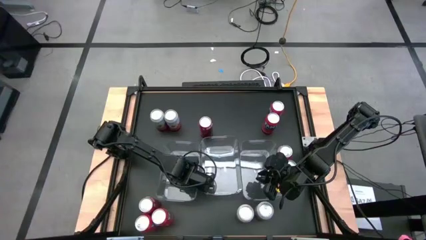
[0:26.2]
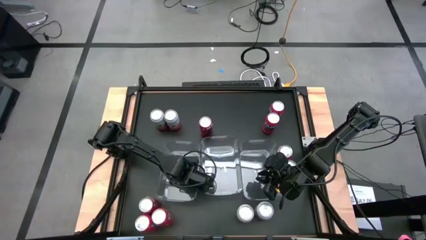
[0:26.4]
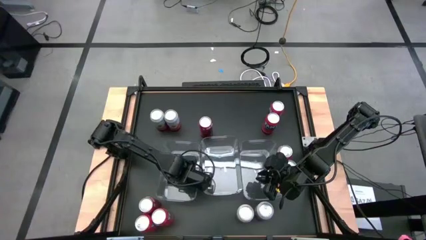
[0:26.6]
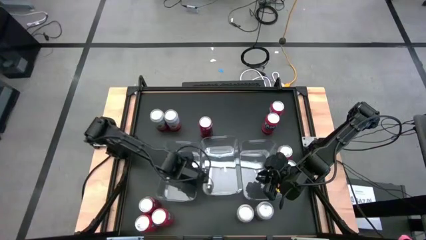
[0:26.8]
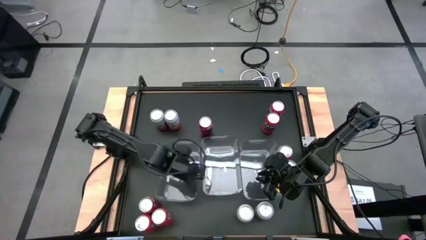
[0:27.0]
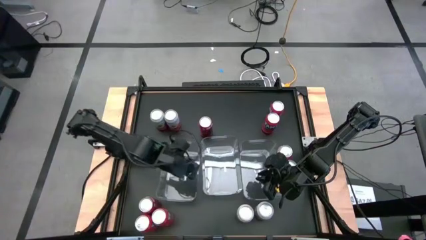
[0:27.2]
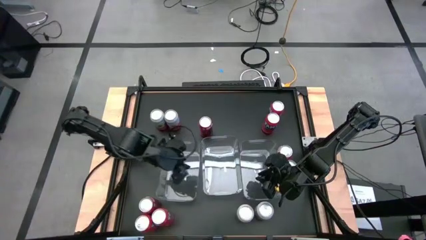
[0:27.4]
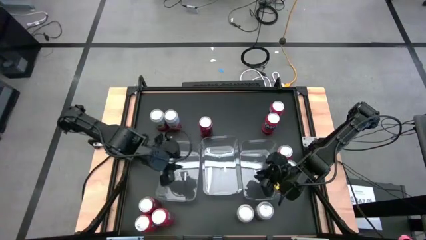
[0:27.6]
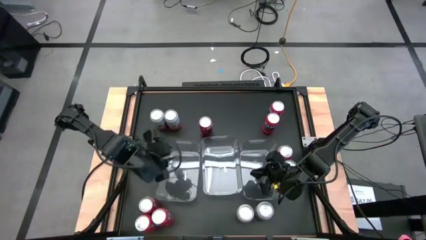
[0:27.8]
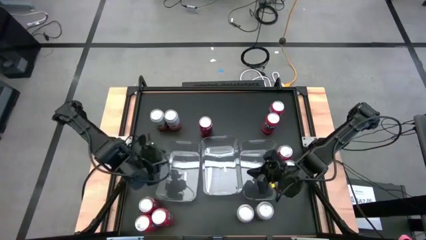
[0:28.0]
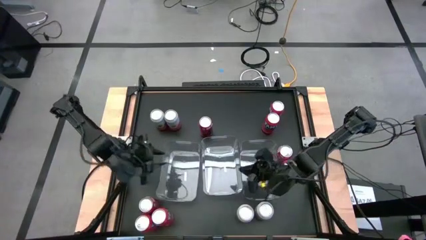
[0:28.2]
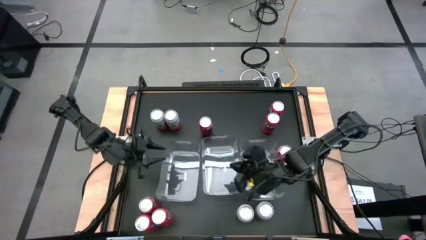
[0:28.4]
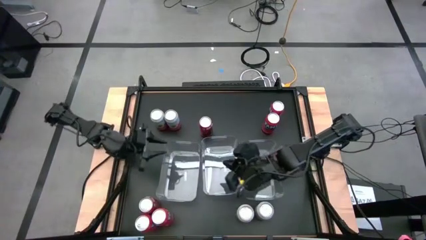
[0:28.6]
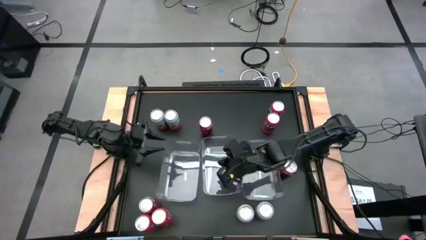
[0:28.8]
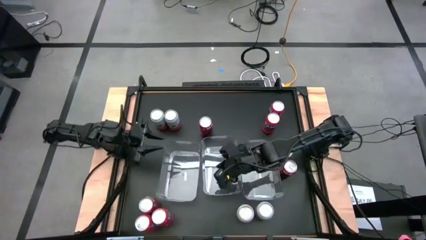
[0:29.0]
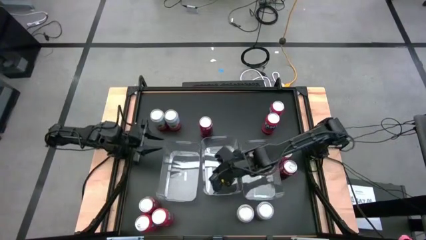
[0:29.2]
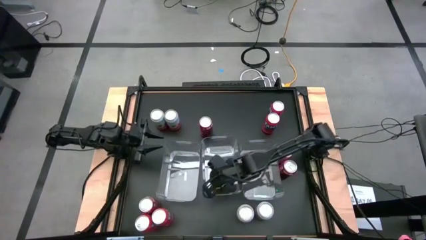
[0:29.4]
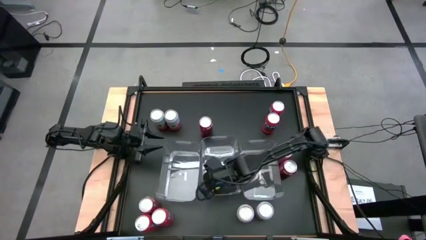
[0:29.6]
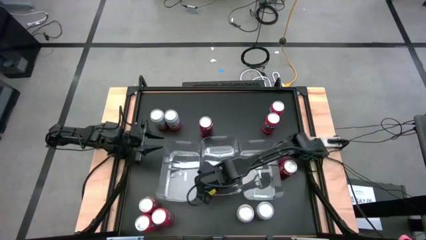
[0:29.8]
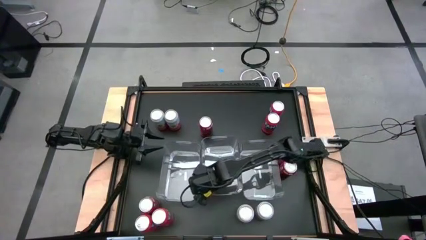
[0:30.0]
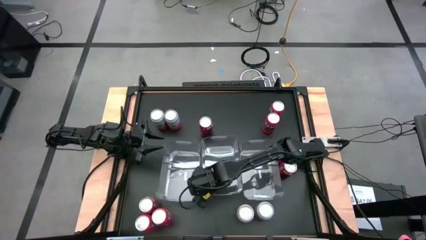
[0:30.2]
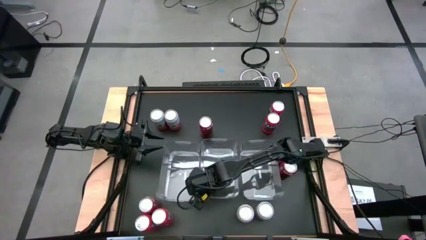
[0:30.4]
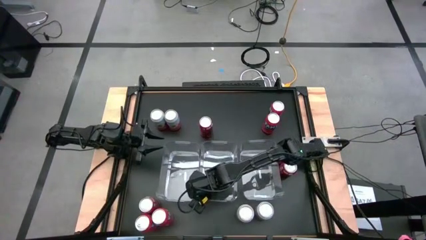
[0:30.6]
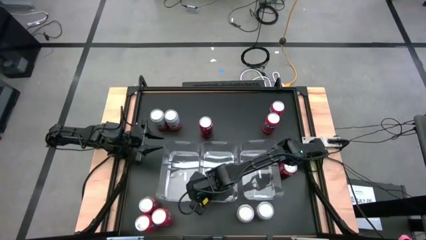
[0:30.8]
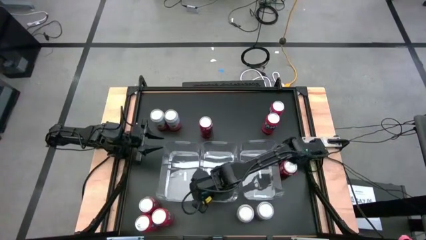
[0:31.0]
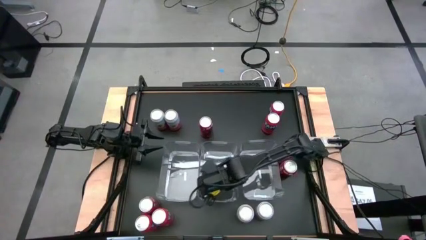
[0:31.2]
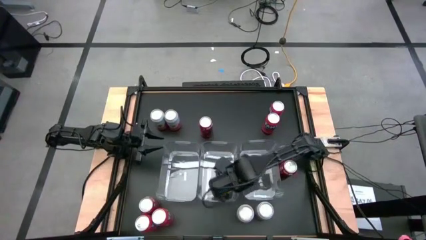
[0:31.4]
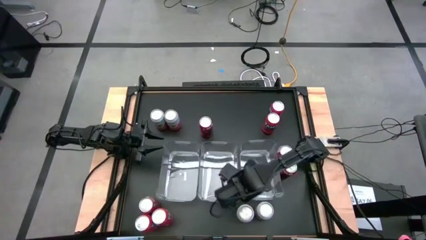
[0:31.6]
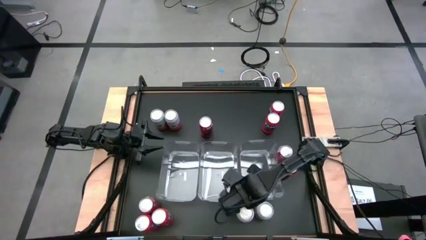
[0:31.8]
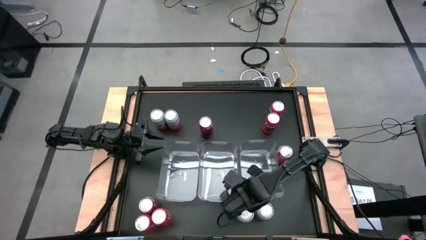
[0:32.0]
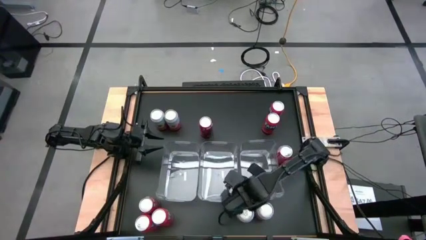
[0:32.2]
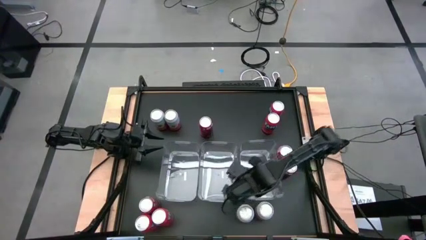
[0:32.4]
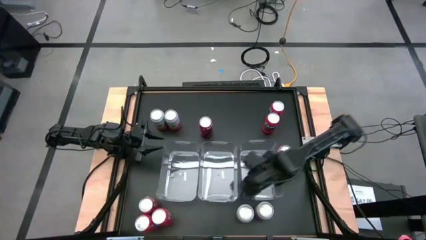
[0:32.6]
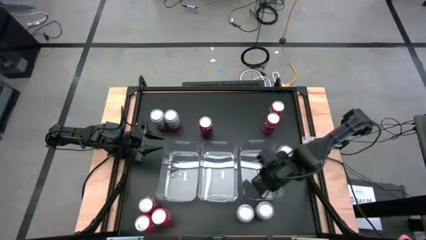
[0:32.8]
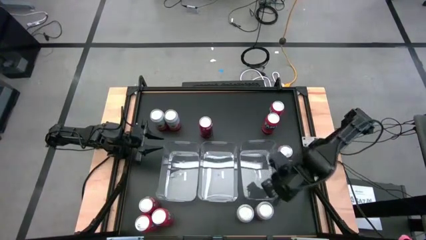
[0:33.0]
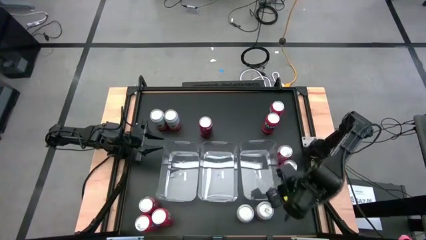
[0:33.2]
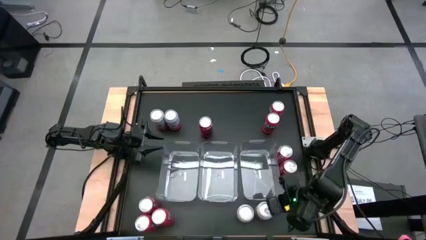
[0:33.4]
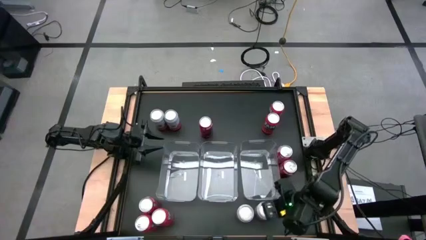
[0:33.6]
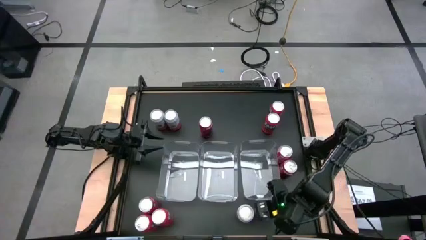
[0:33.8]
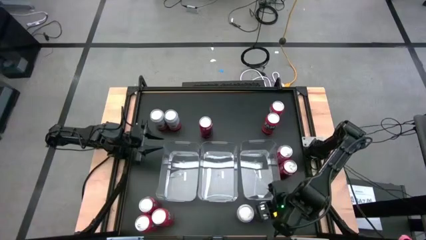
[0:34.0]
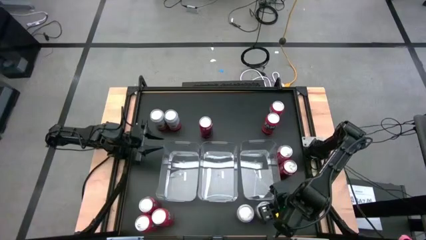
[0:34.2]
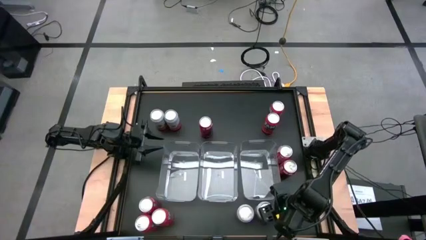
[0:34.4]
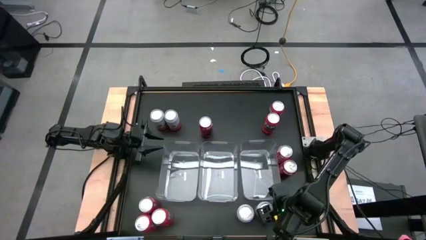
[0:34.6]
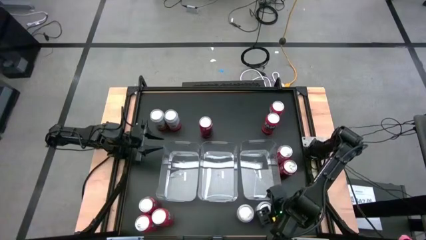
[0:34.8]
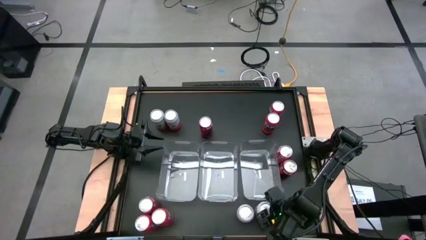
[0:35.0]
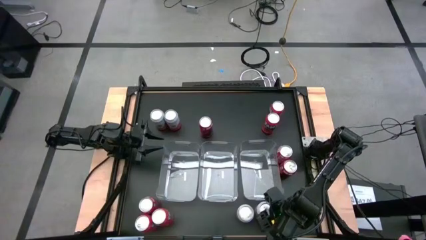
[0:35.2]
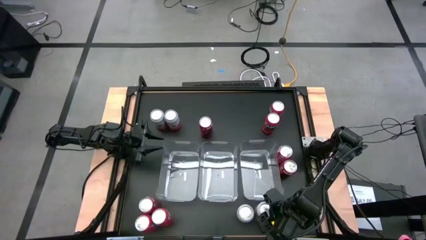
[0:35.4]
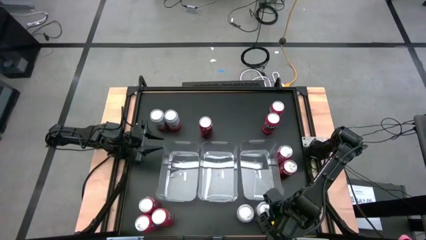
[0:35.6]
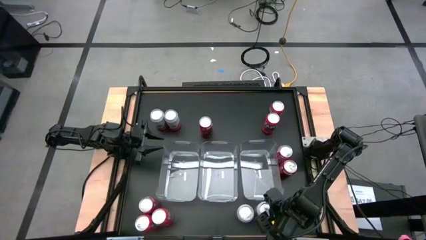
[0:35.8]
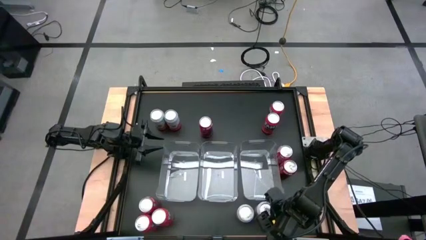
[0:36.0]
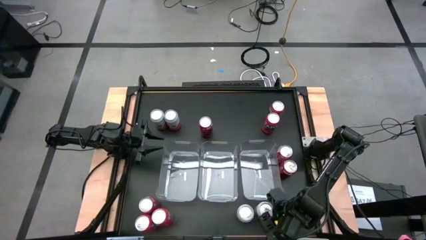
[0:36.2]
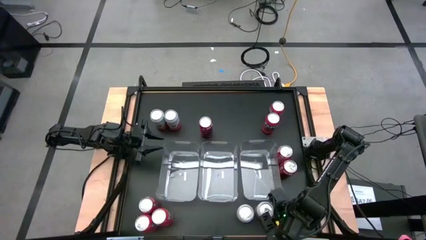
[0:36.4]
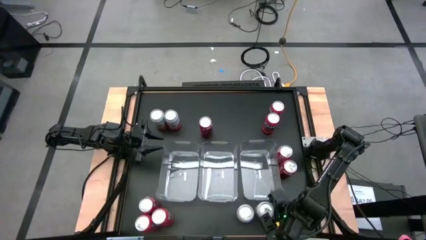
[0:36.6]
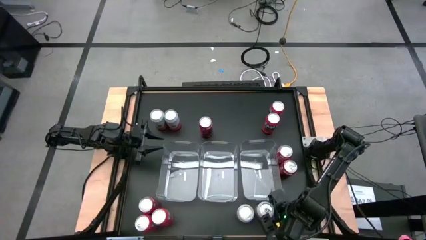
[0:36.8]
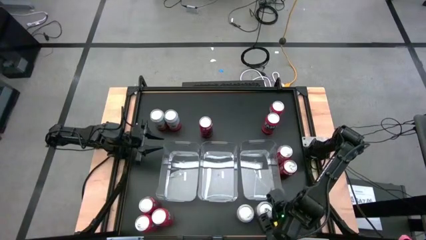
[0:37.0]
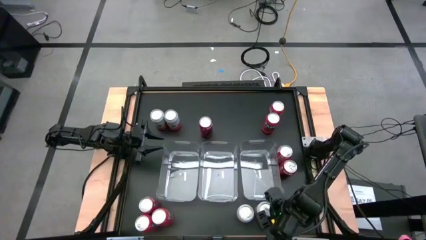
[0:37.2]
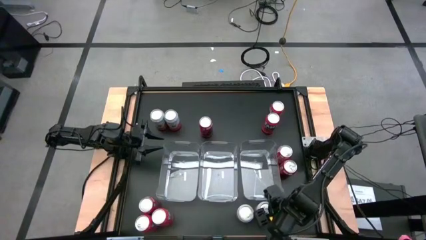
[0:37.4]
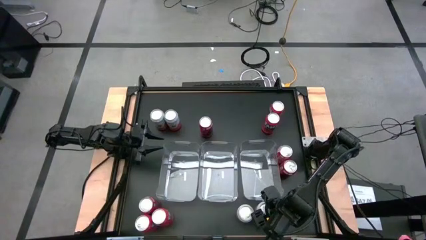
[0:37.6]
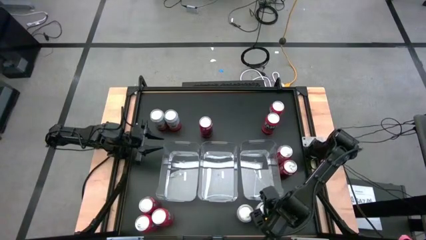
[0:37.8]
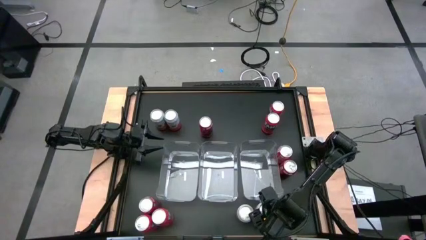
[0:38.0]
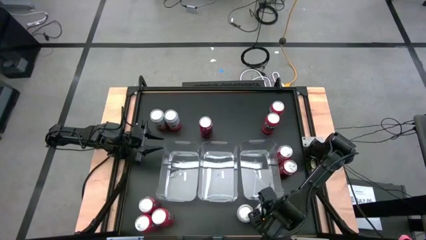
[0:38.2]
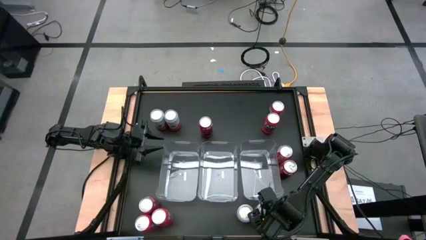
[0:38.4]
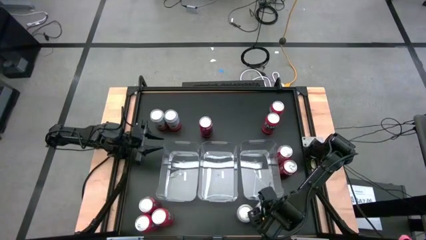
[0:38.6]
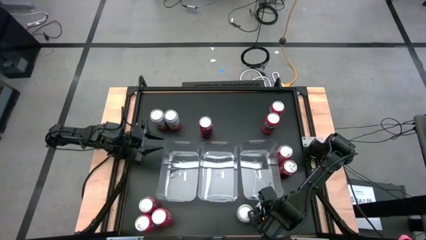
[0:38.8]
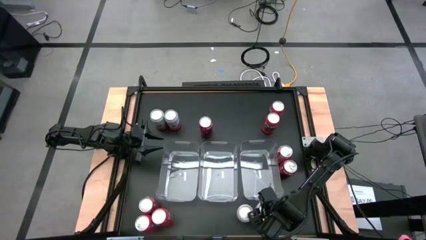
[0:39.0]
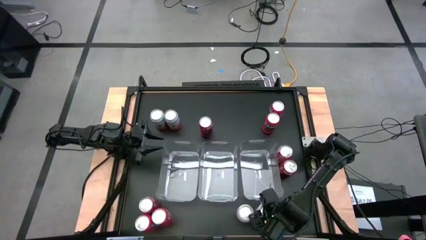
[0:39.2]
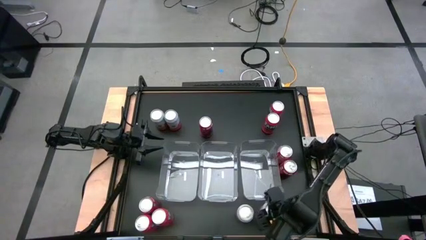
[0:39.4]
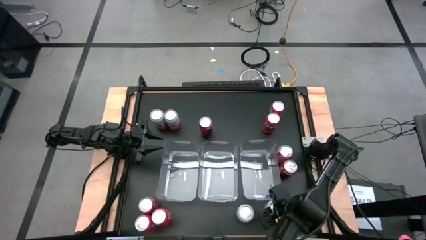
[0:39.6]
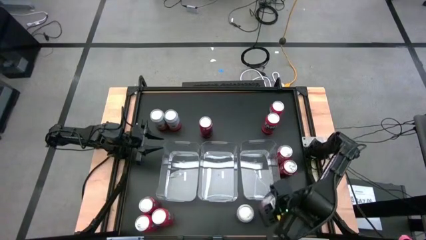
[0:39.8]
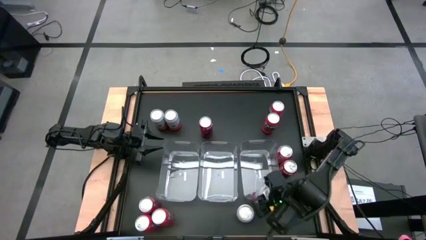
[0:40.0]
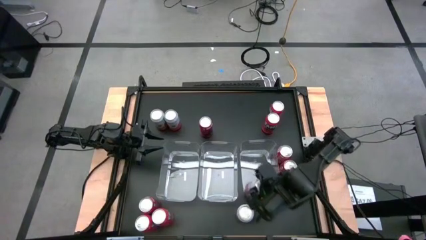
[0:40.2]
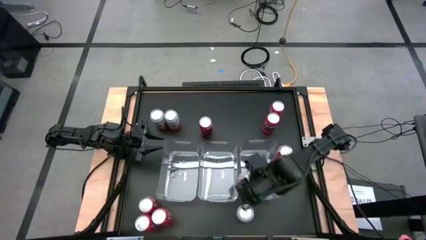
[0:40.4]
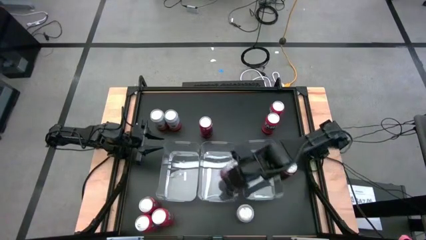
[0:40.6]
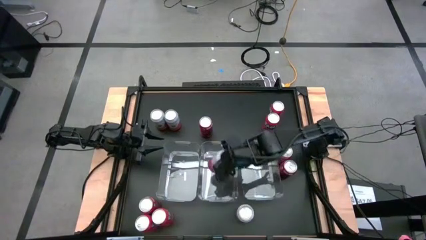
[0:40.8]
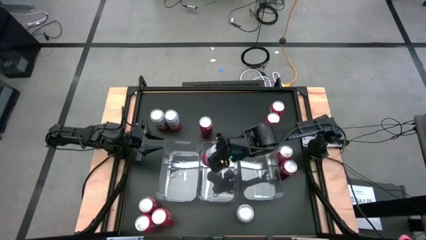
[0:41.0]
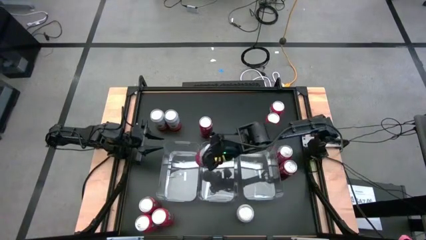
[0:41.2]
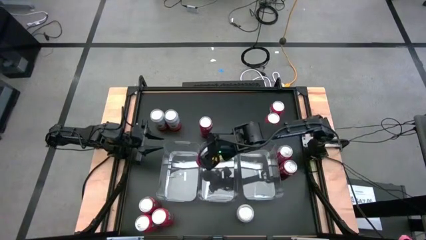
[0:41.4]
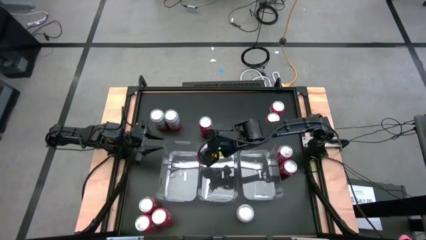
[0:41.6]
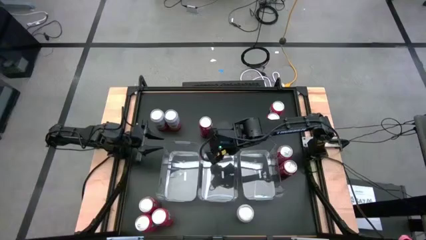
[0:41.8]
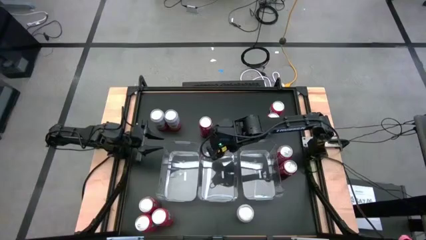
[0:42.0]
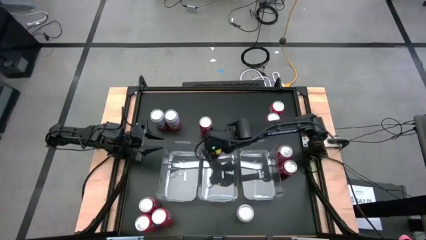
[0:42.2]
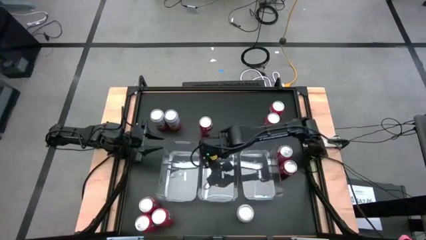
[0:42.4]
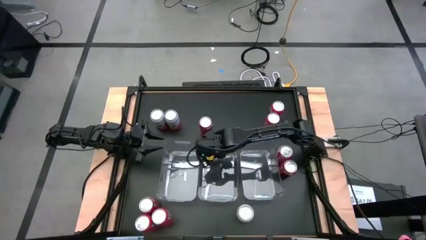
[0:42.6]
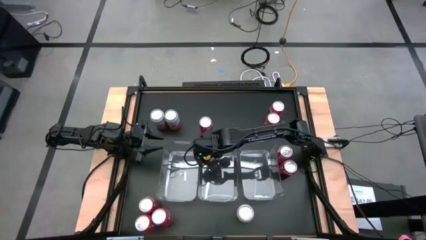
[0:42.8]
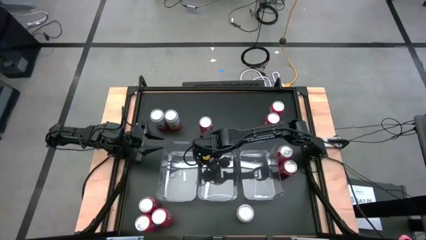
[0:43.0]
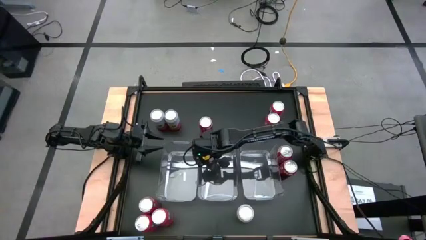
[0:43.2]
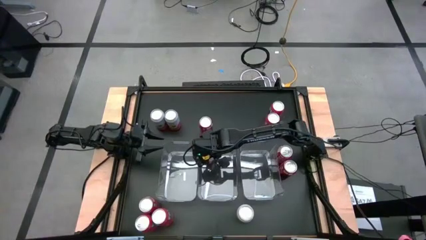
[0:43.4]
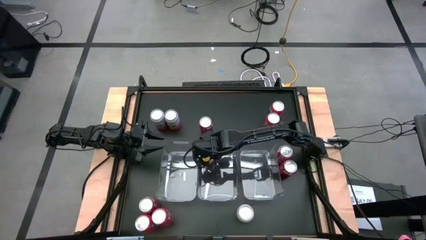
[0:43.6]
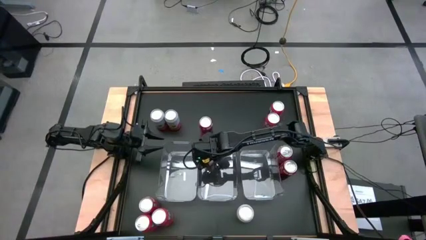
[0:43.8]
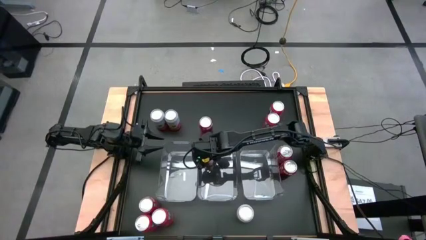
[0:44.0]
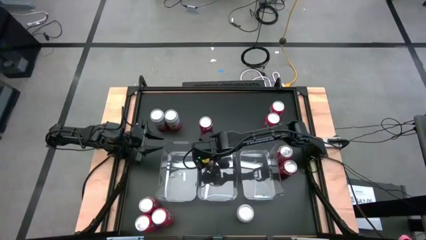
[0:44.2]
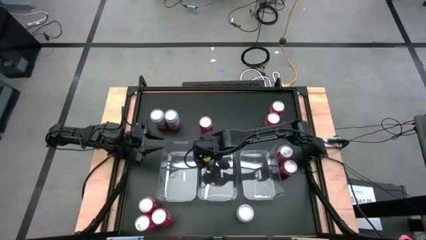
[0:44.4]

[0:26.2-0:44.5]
Task: Sort soda cans
Put the pink-white soda can into the center transparent bin
